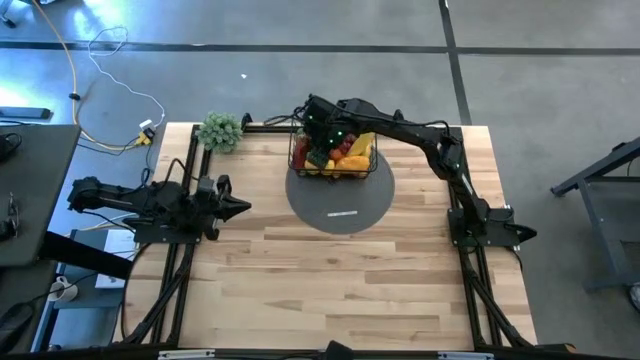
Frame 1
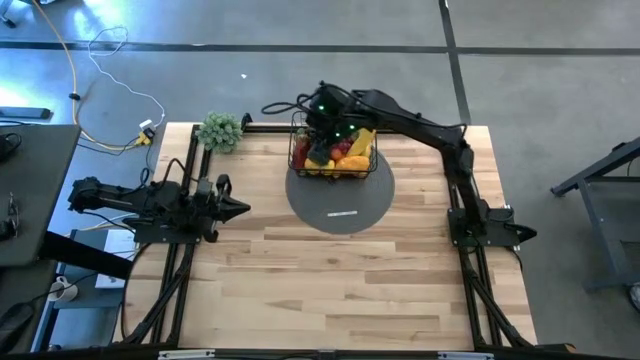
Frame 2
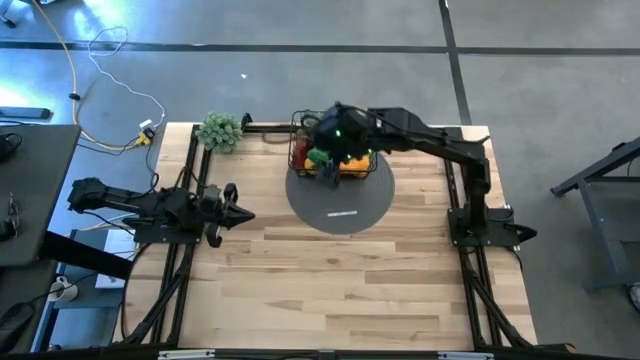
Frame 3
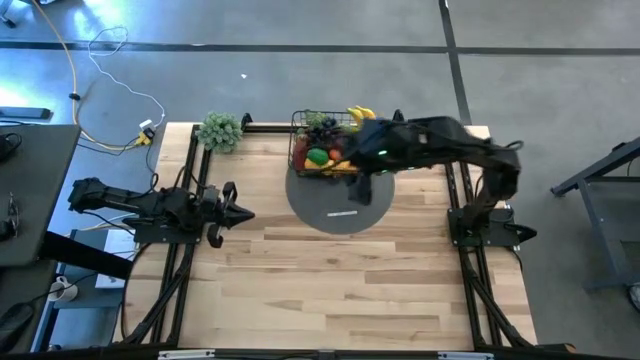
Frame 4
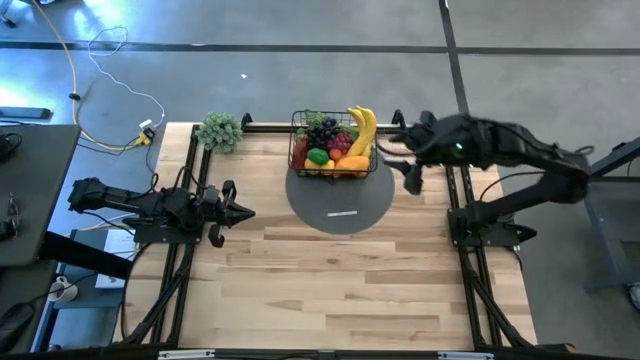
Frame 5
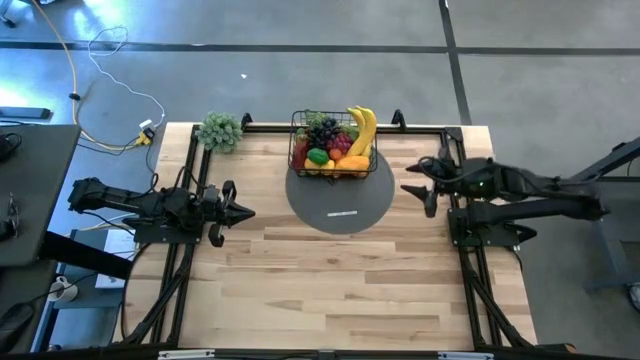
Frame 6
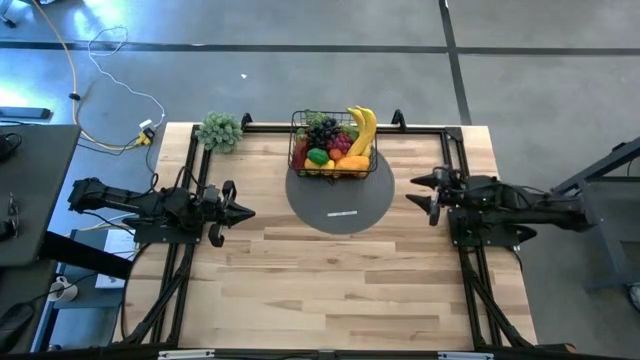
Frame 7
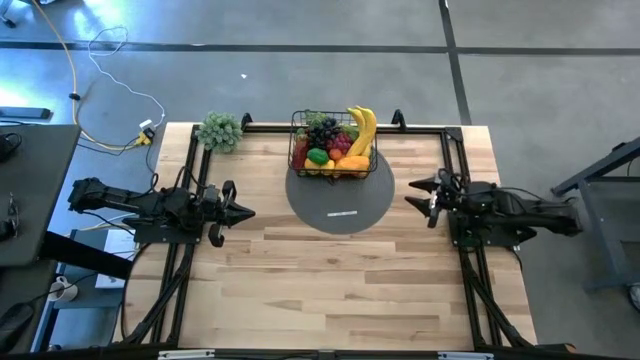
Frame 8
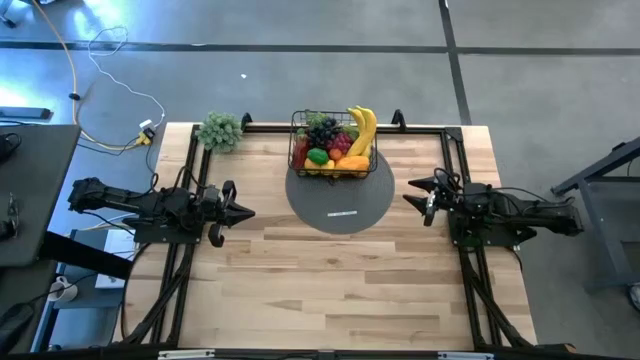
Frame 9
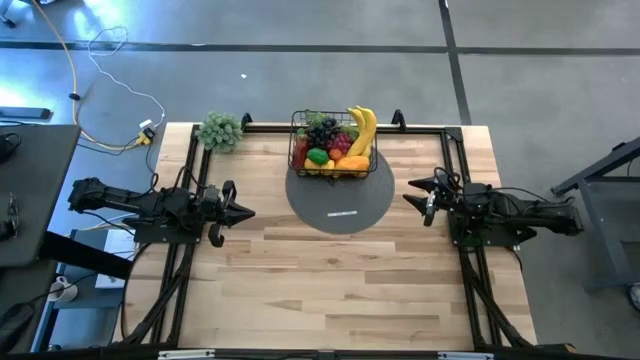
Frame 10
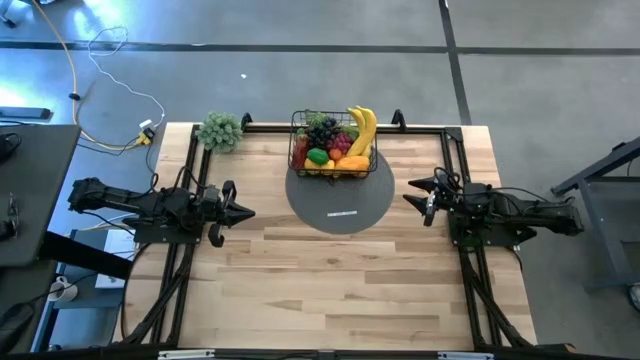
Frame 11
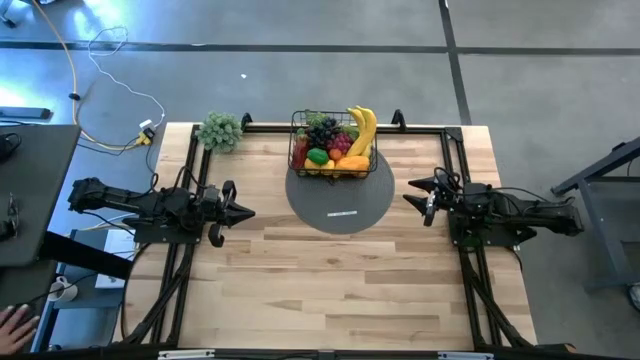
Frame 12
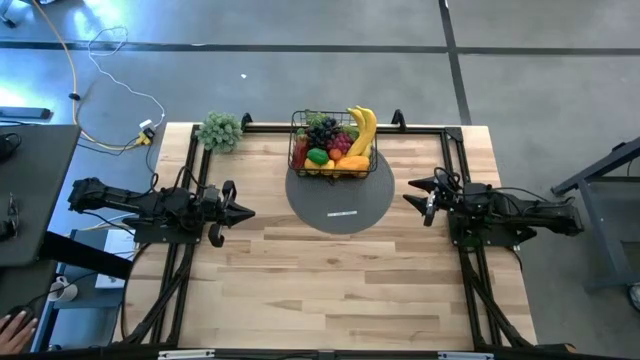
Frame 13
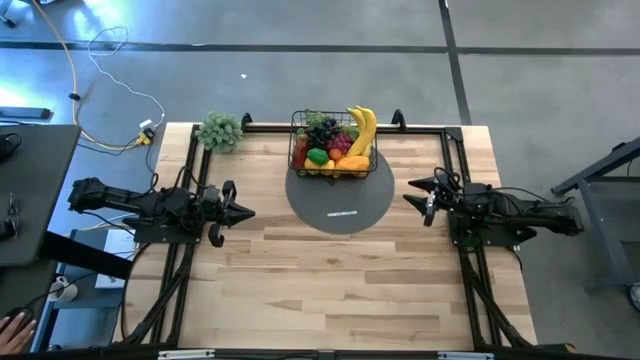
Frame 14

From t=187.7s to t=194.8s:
Task: Build produce basket
Return to Home Position

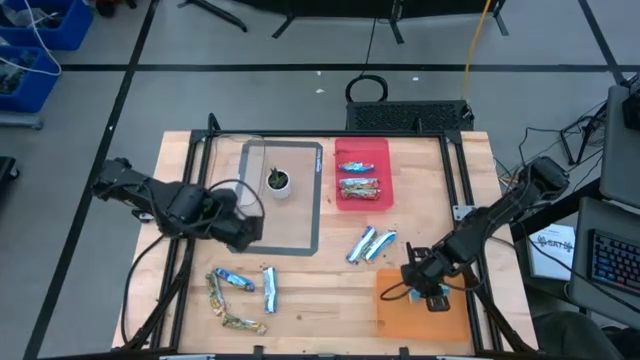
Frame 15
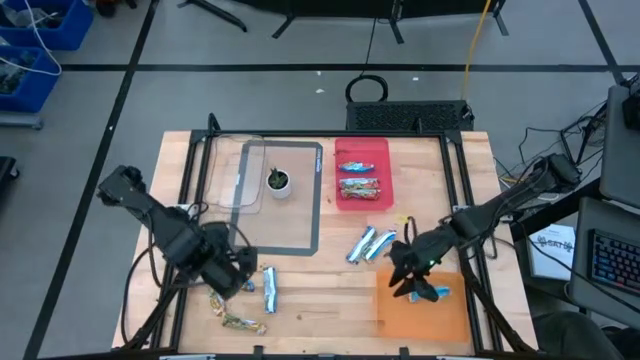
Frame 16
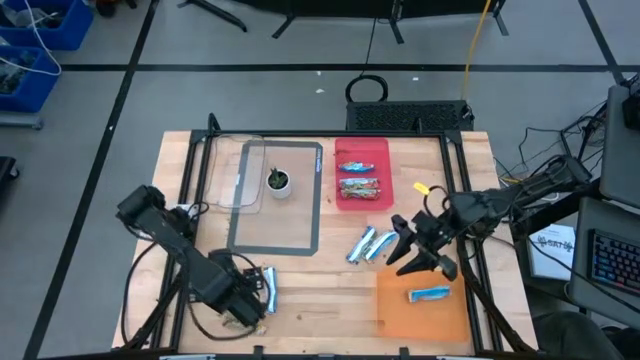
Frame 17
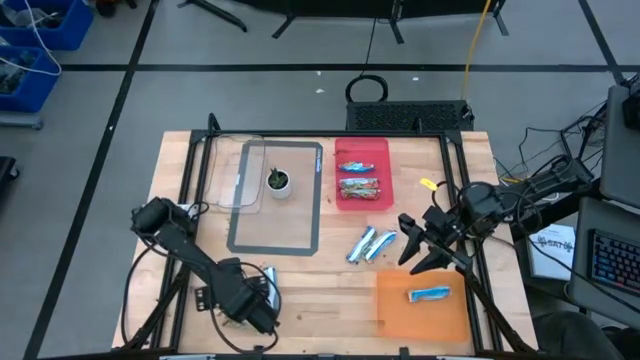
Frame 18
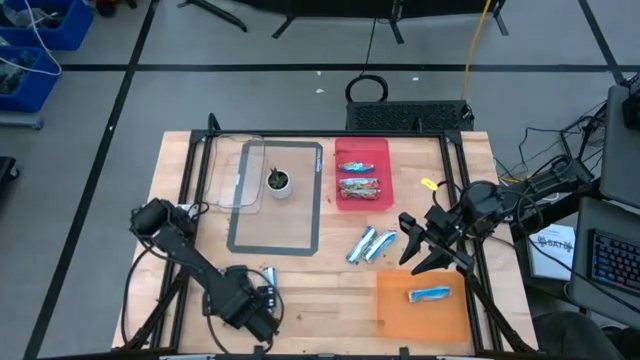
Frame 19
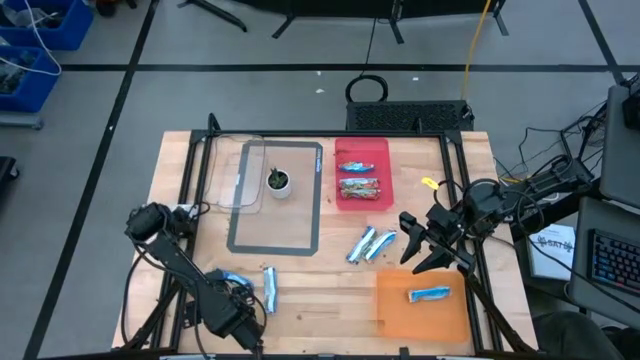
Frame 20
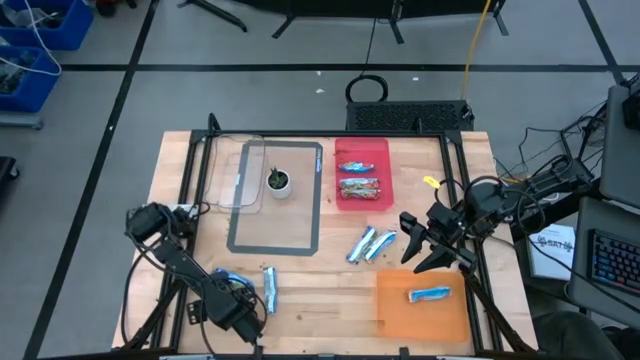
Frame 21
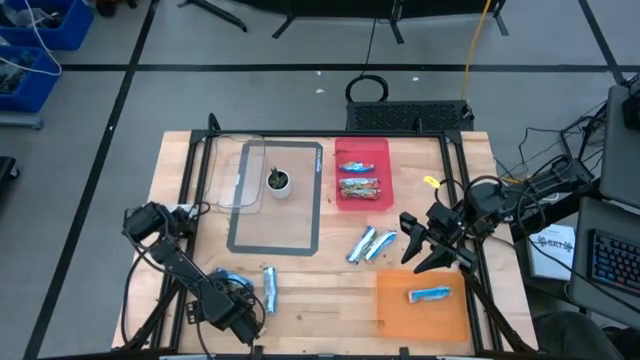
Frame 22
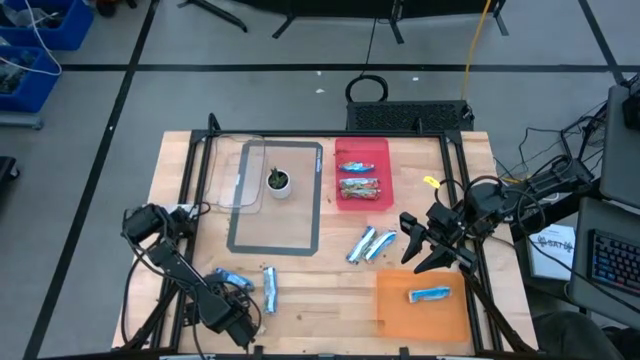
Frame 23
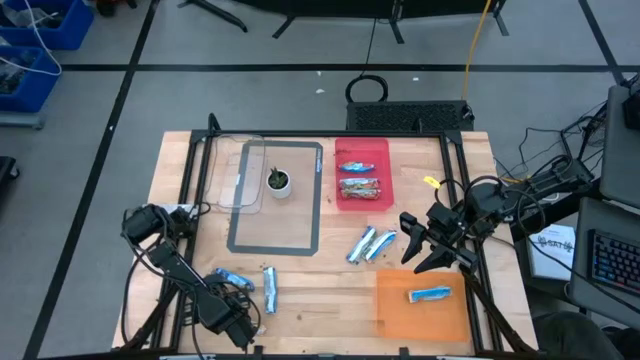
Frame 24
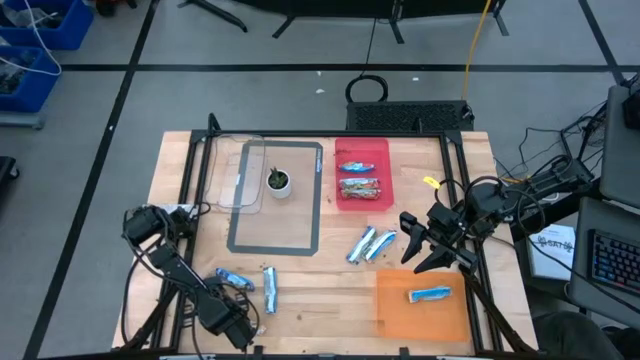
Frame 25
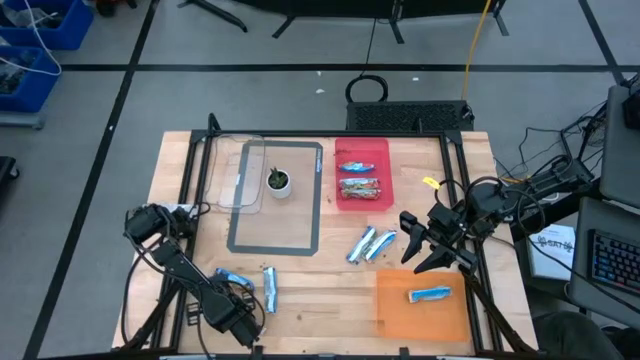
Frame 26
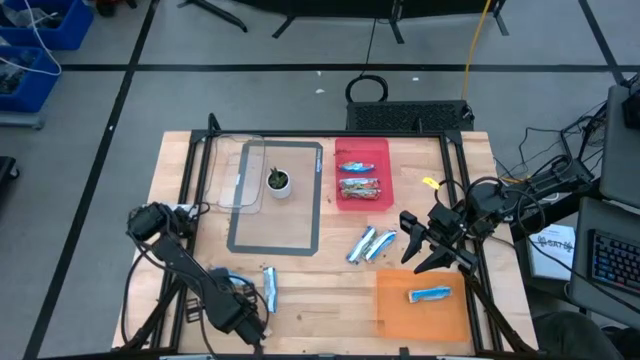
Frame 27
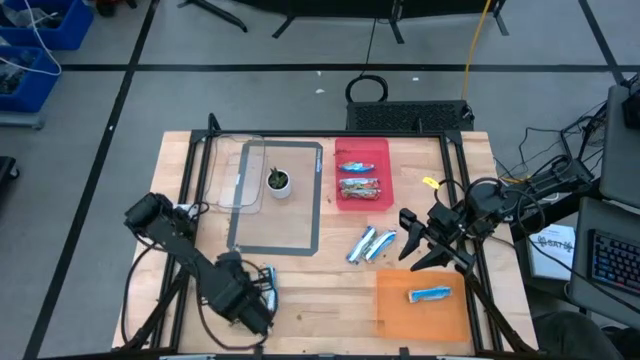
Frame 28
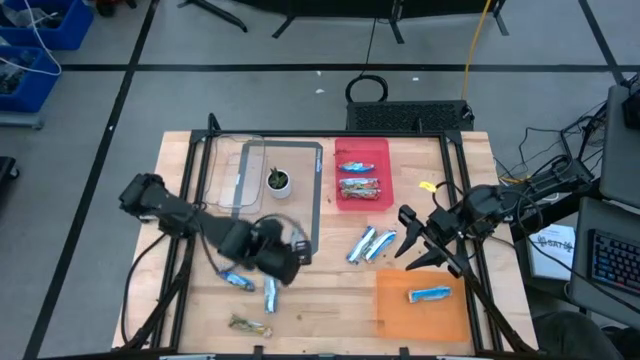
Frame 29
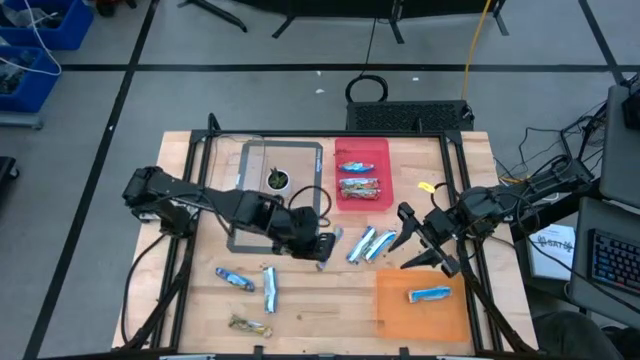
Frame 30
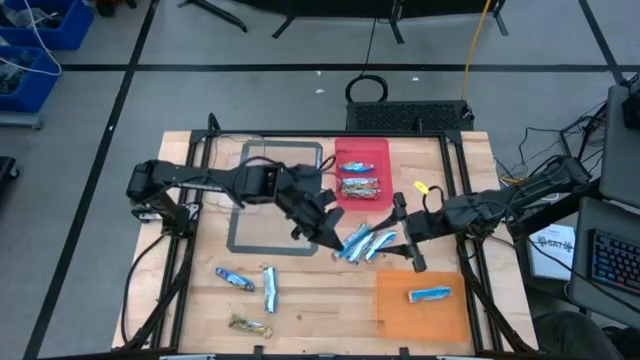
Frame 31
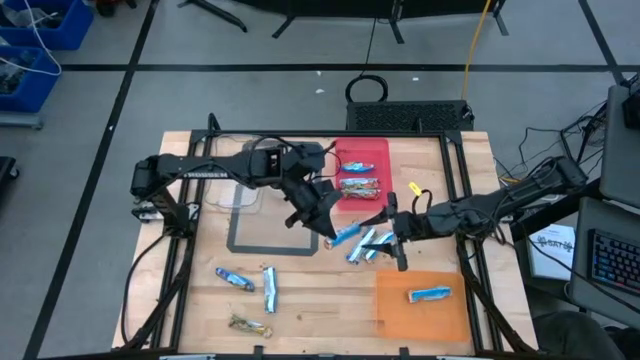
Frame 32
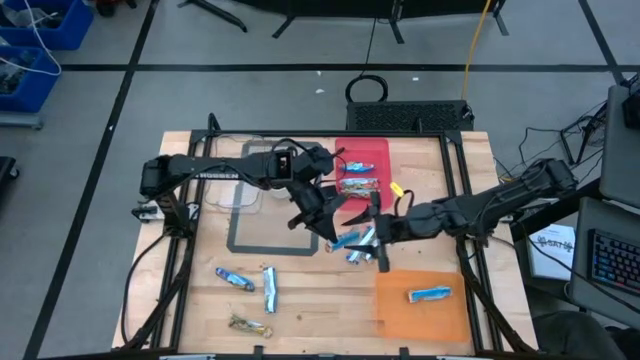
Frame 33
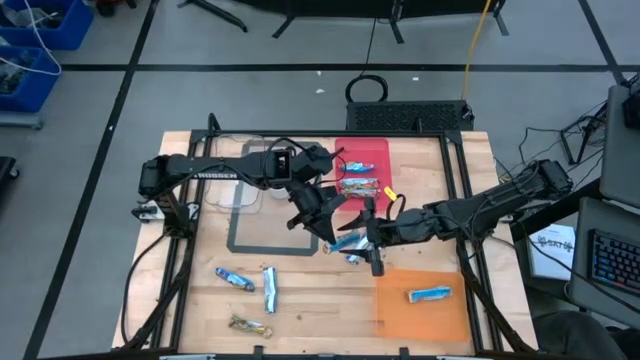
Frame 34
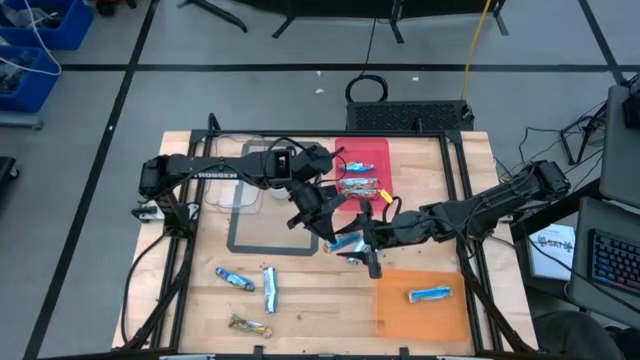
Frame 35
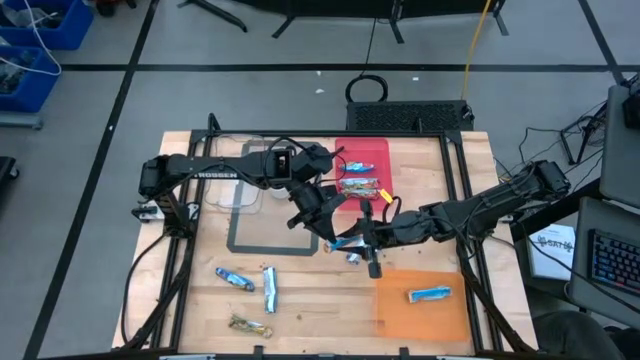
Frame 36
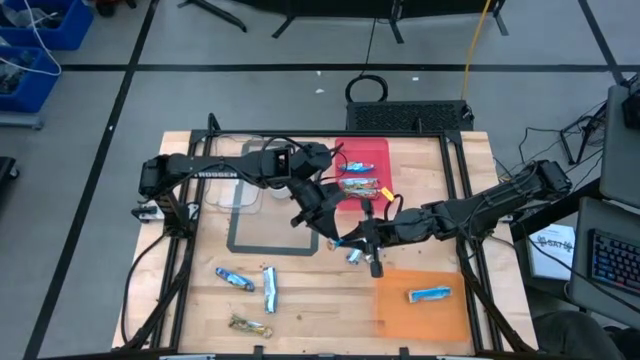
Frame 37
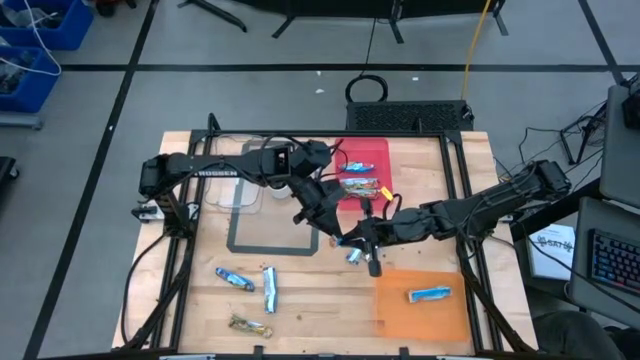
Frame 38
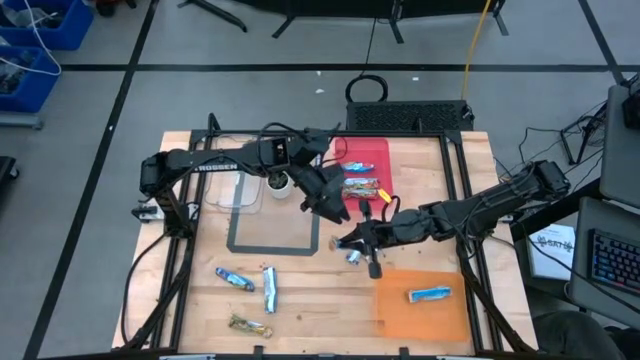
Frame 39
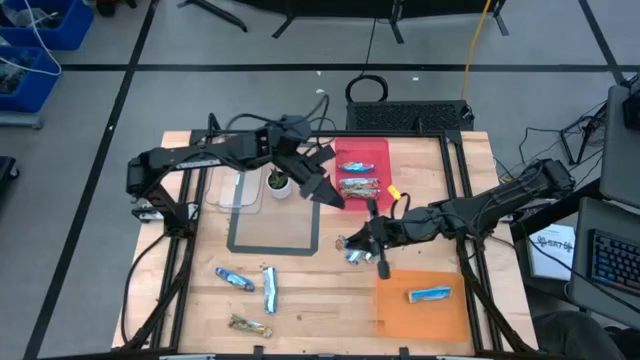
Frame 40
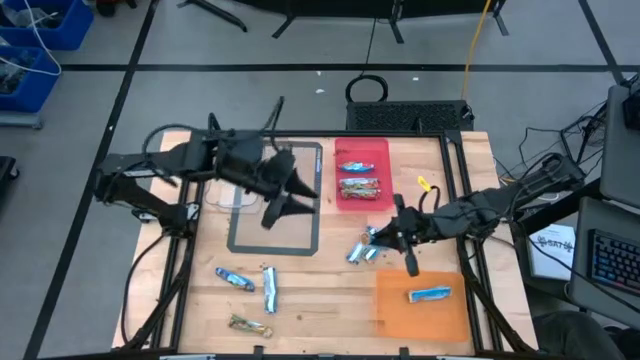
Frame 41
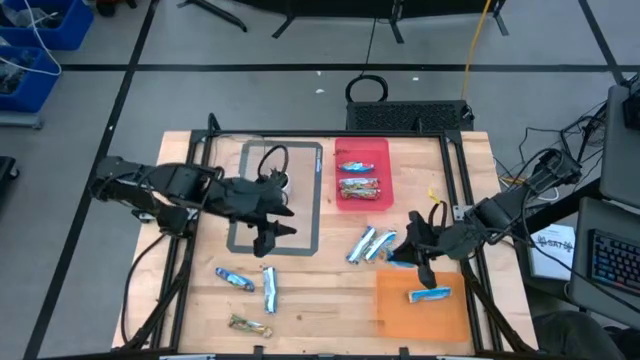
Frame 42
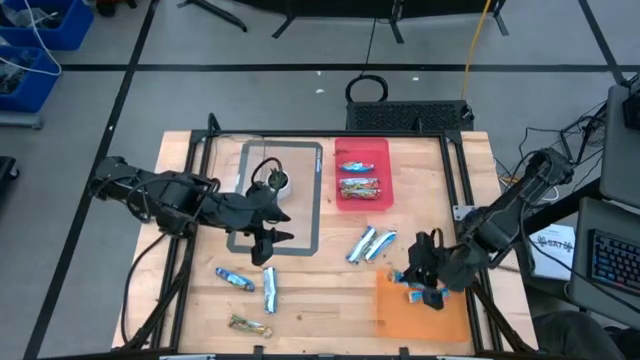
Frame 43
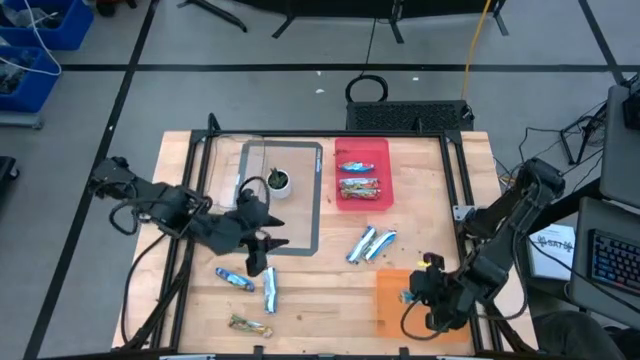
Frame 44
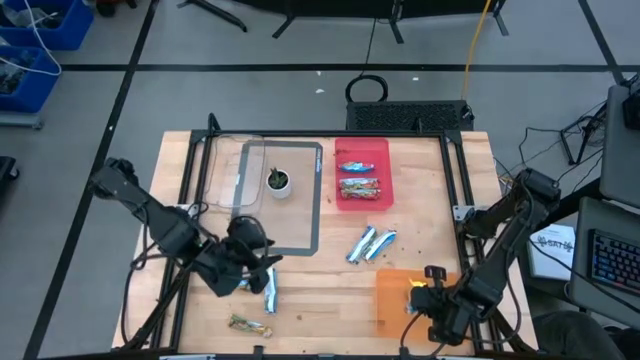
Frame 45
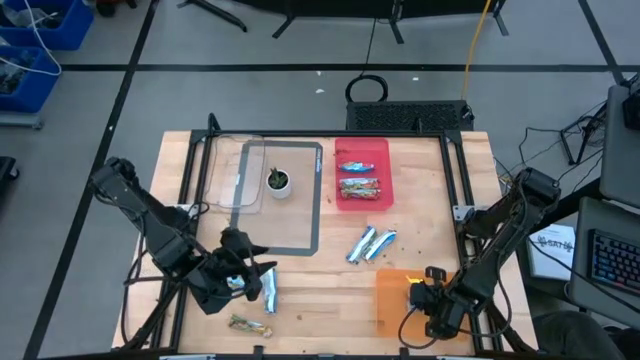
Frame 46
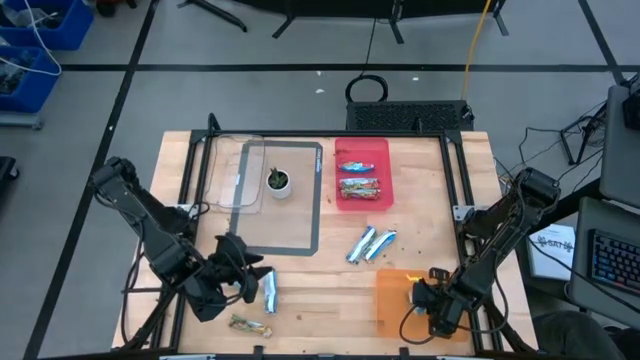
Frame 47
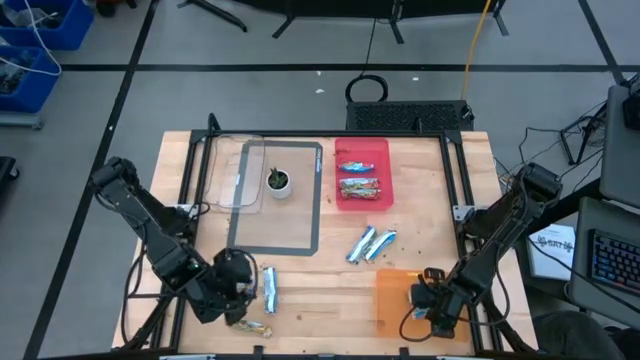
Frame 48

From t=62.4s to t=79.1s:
Task: Pick and place Granola Bars by type
Put the orange granola bar into the orange bin
